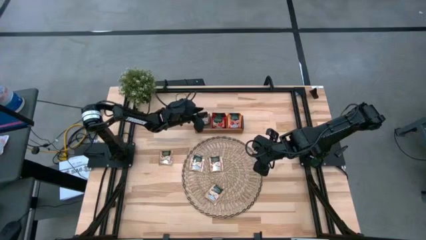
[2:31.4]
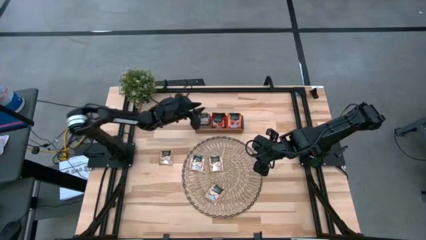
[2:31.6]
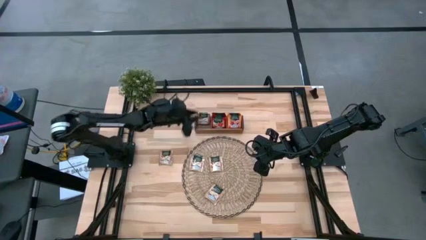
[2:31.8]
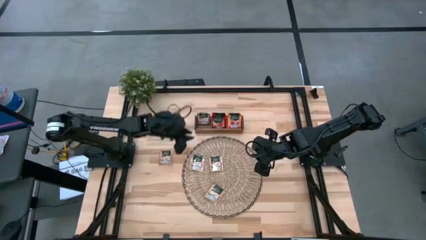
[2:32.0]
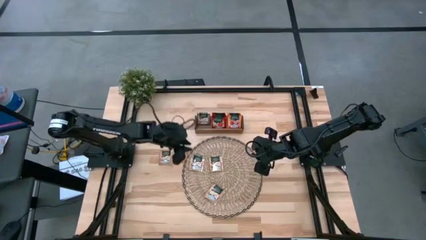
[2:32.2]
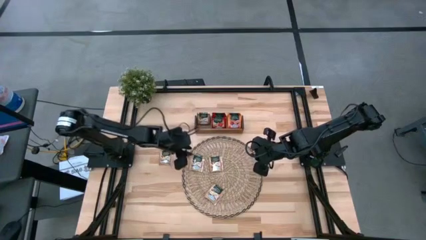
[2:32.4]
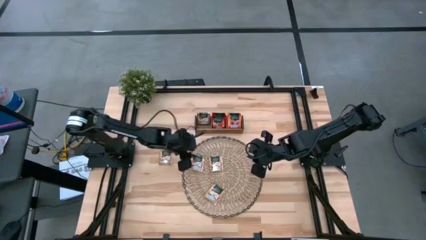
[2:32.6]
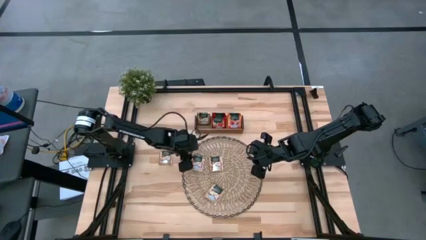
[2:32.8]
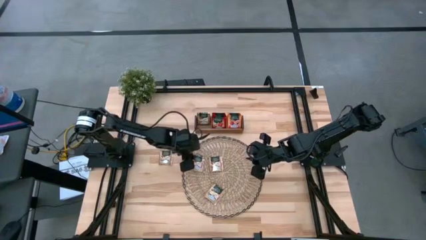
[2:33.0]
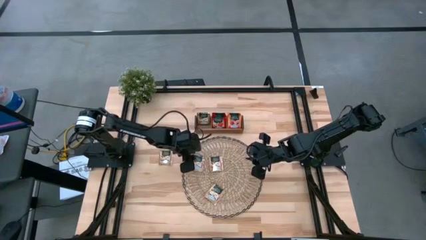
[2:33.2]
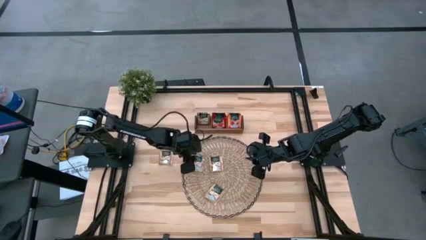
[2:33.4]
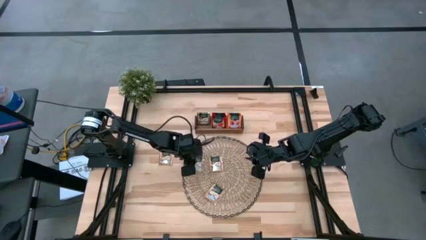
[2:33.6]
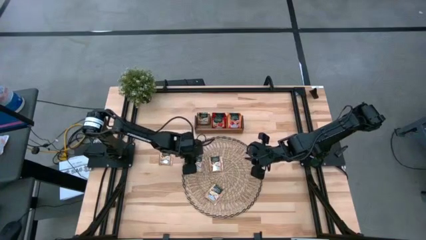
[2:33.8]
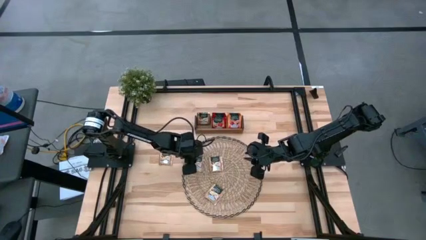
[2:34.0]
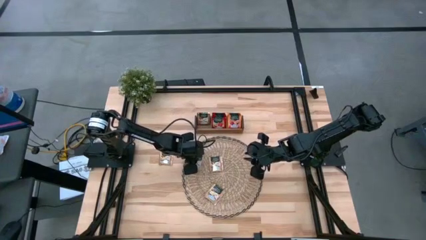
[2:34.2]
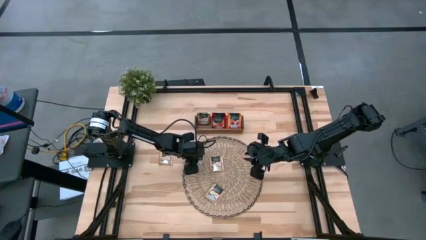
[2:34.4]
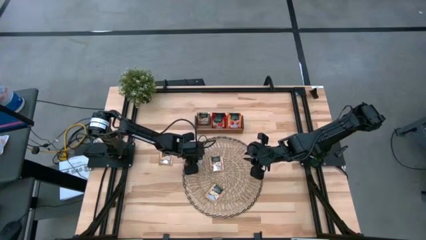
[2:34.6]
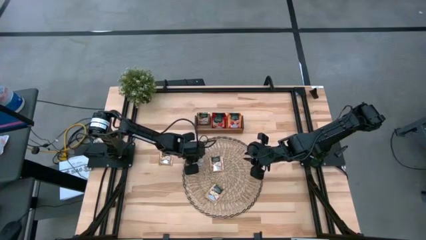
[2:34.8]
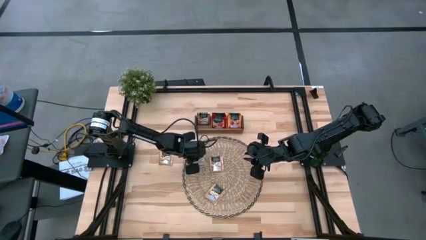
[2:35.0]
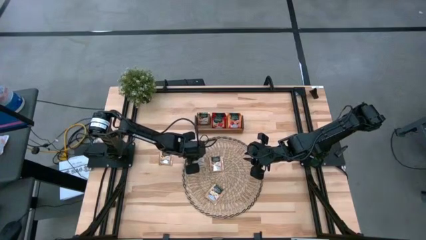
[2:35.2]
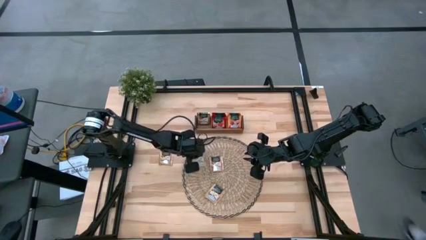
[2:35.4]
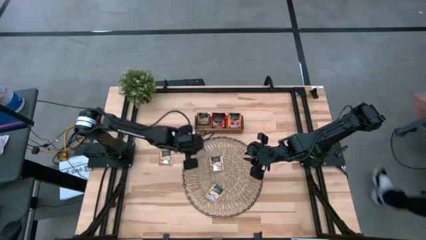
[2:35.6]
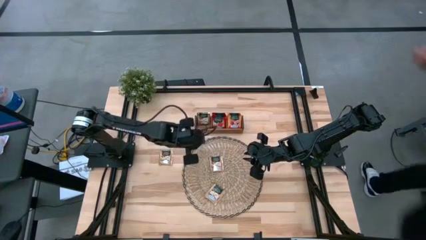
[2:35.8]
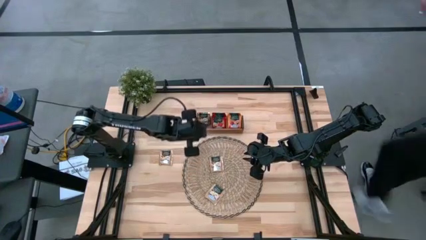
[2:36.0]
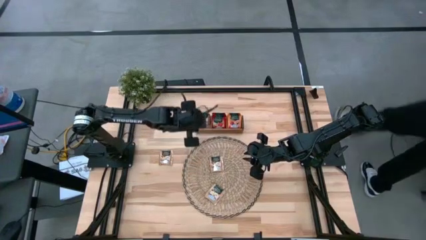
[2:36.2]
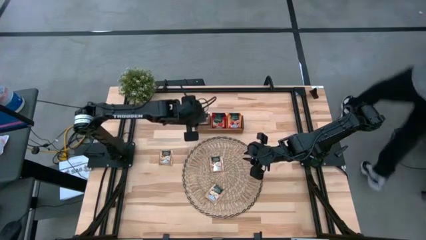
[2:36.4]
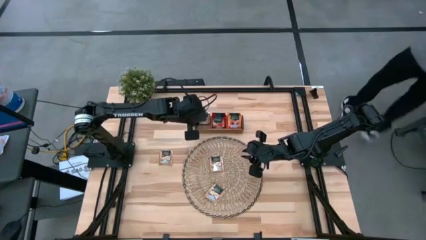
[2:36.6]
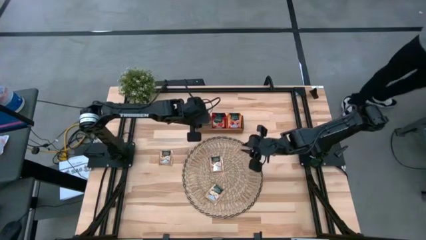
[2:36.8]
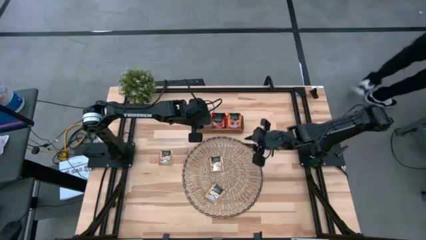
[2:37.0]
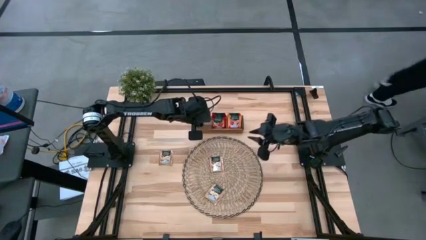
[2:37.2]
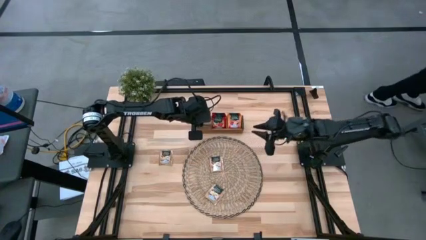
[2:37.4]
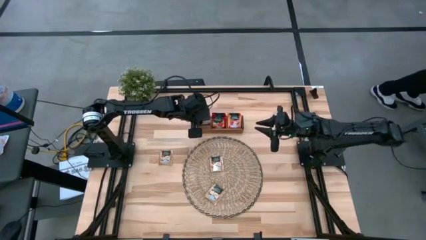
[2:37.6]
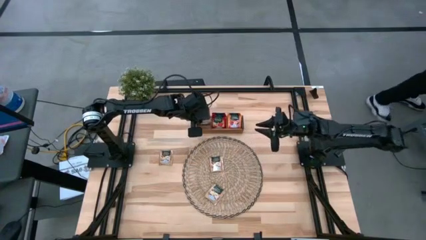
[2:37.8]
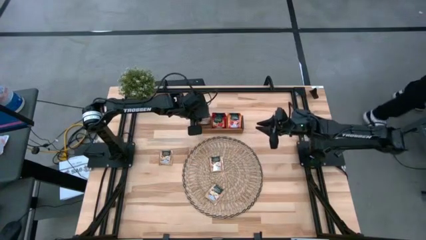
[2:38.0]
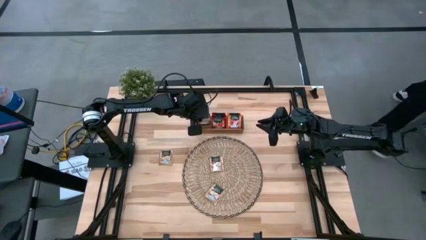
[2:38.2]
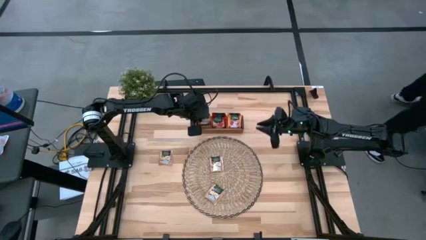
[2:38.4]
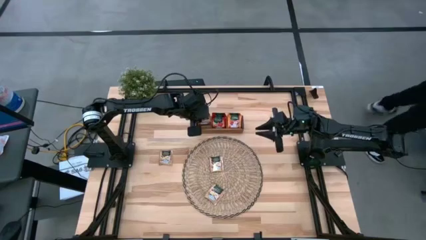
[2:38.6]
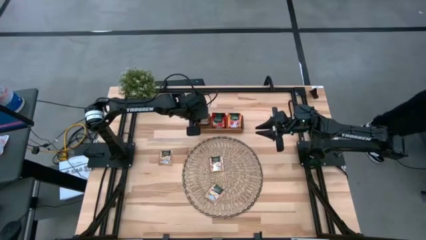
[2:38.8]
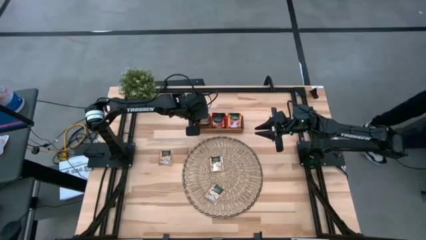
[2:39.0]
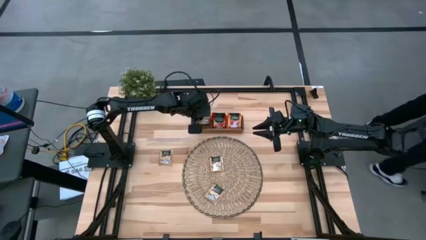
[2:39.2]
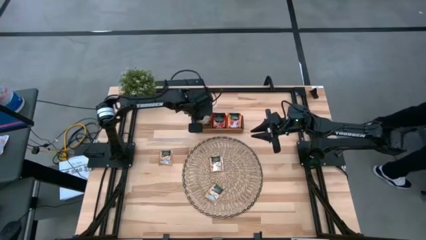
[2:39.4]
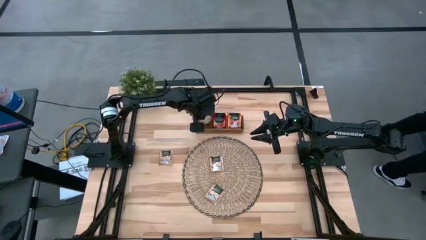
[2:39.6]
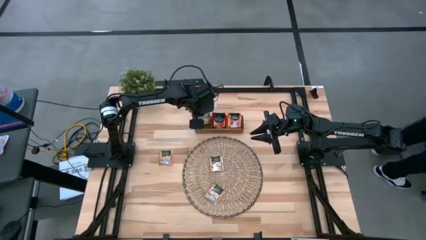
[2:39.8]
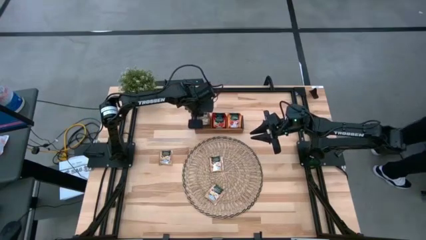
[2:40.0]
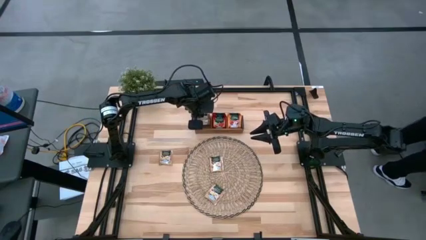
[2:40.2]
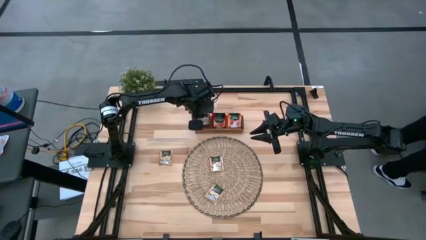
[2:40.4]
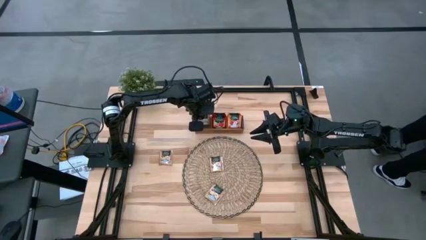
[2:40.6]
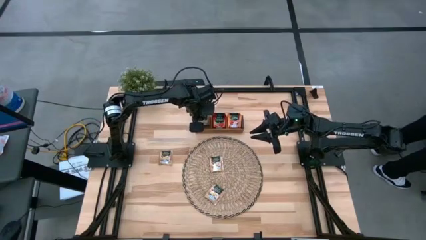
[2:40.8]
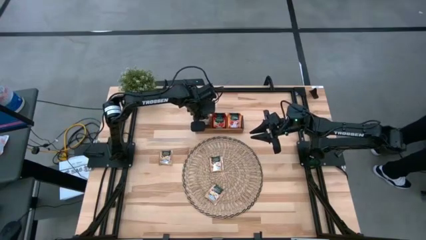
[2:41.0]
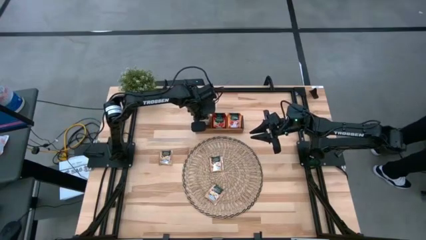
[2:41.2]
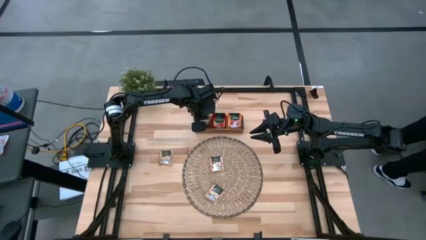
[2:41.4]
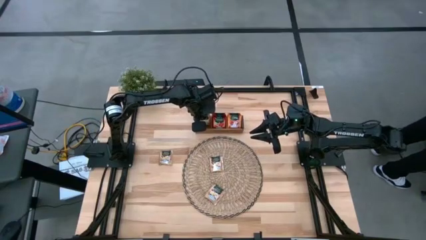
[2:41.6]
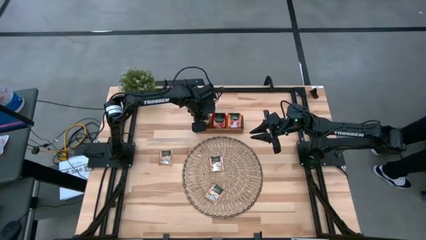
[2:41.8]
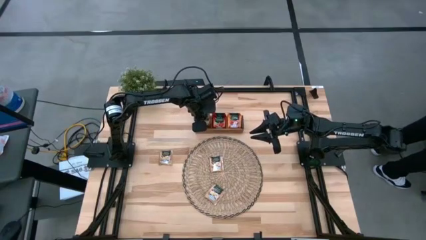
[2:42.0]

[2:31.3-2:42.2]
Task: Pick & Place Tea
Put the green tea bag to the left of the wooden organizer

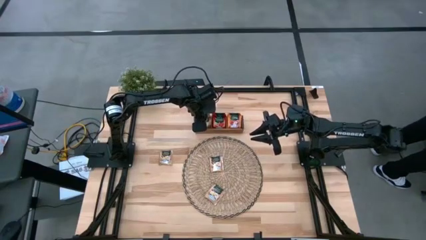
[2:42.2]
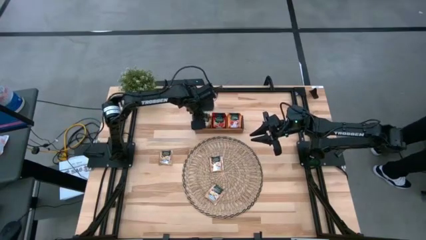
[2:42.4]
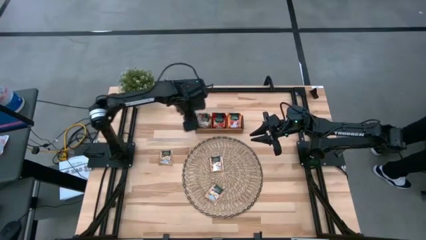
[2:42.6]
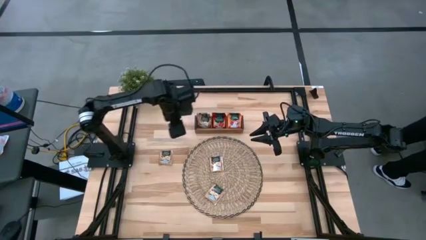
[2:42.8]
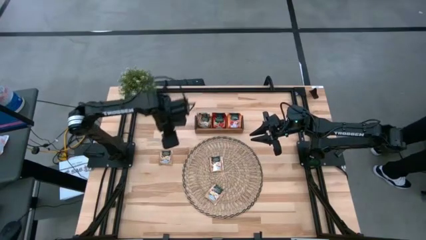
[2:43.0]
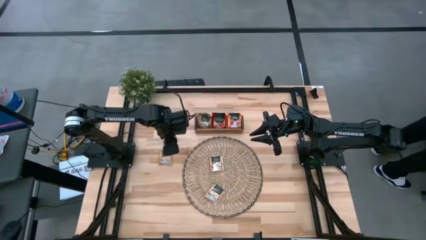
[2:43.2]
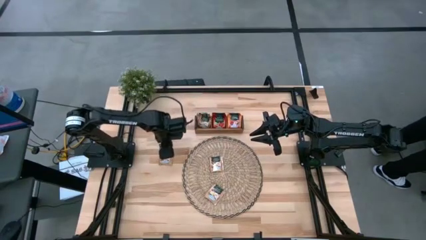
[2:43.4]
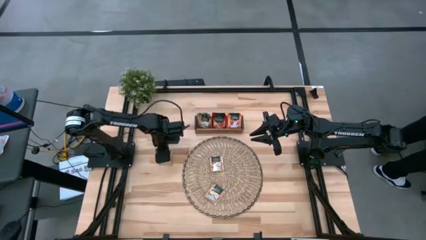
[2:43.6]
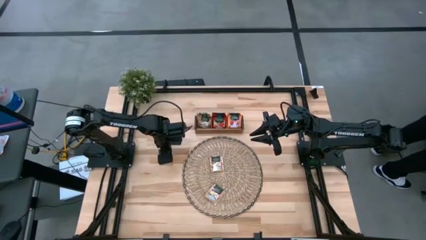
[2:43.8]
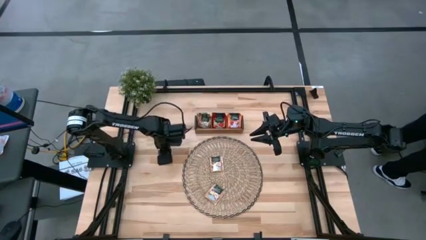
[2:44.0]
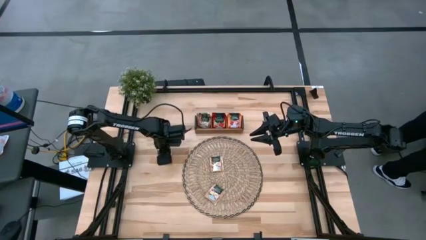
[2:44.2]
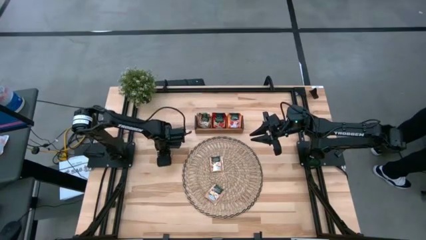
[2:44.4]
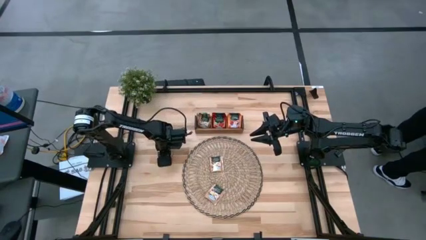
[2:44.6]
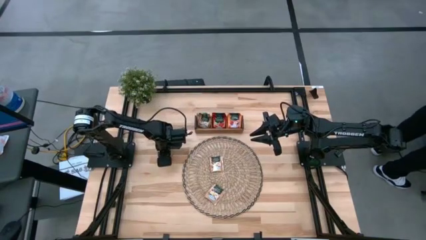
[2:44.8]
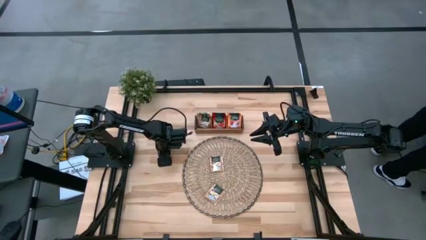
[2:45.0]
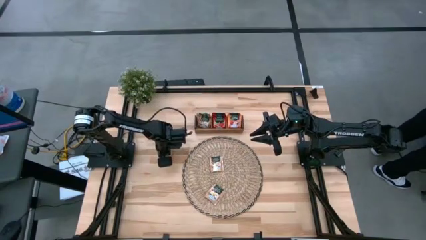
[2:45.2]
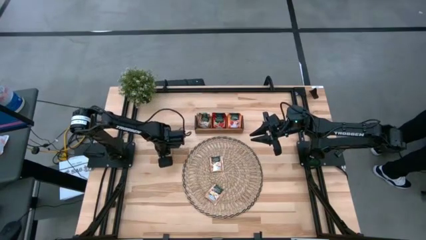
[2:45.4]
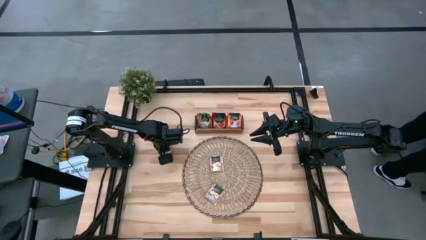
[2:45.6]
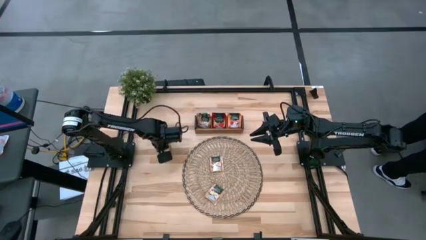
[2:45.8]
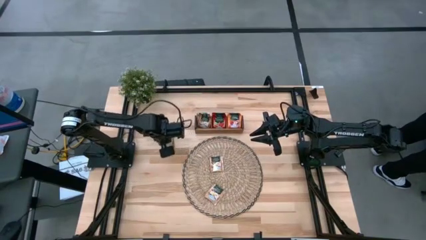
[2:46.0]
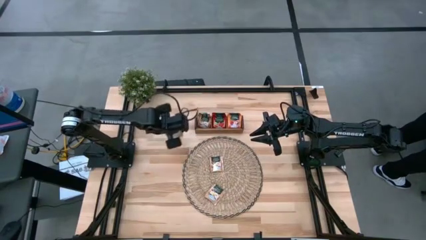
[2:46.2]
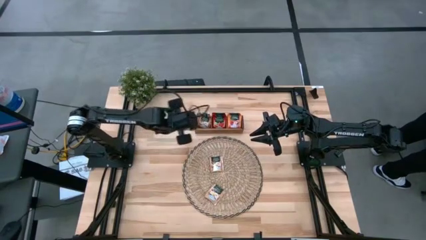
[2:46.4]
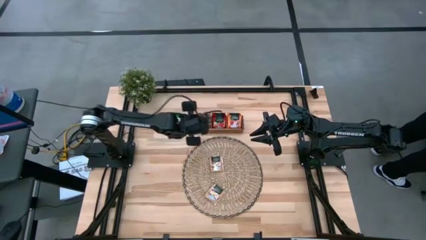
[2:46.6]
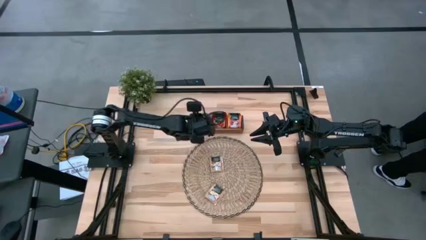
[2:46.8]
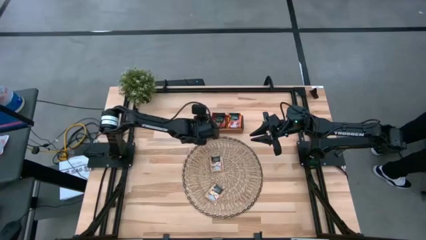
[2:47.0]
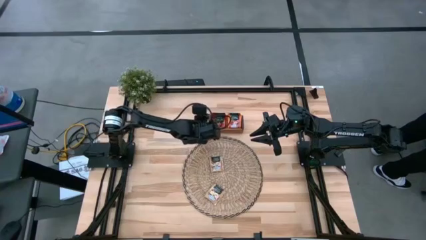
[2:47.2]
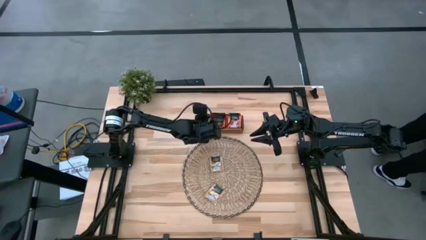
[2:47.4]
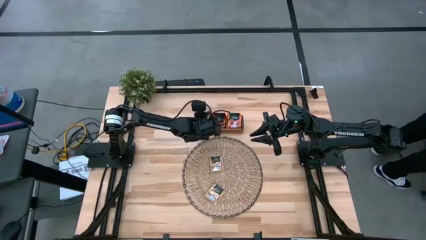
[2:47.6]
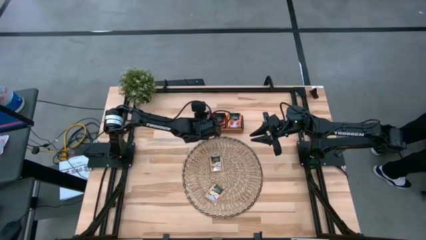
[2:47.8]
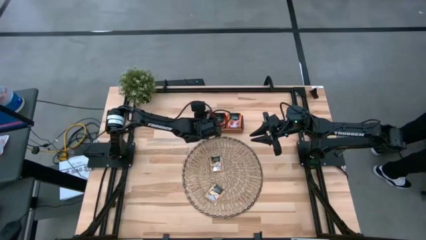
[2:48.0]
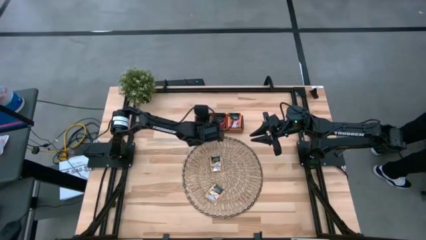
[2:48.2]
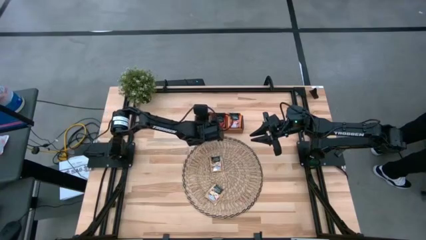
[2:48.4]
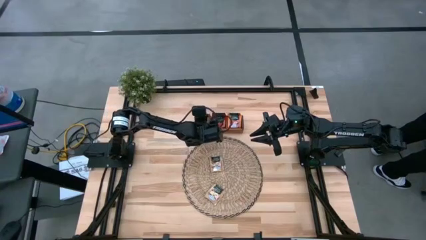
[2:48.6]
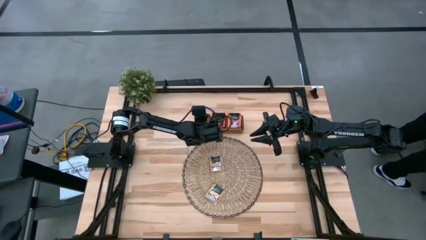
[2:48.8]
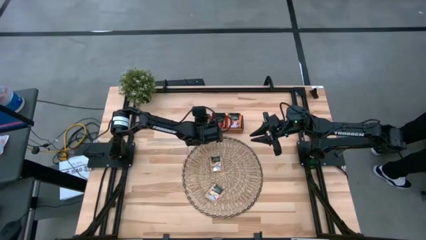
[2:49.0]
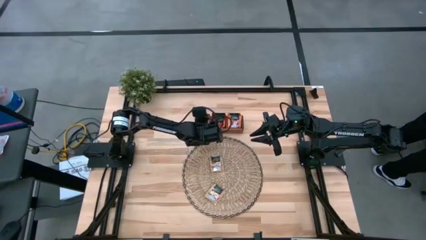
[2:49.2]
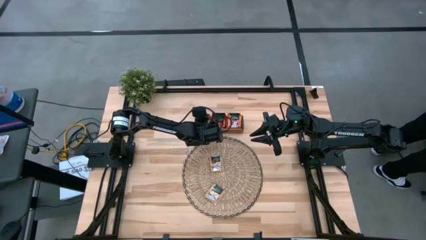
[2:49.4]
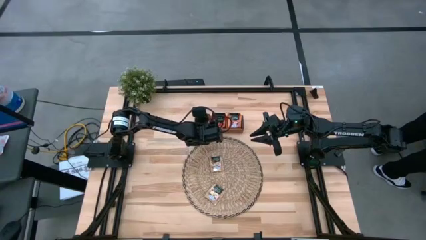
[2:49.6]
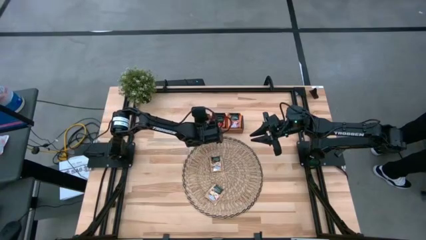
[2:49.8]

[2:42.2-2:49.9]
Put the green tea bag to the left of the wooden organizer
